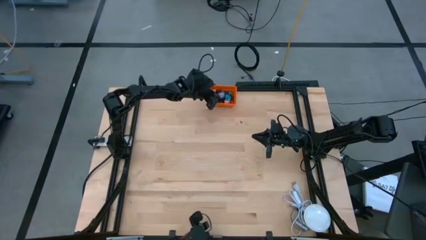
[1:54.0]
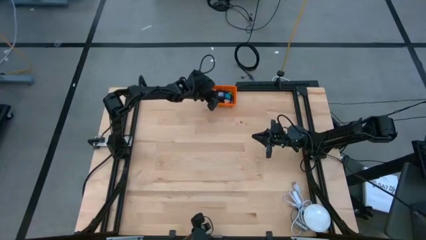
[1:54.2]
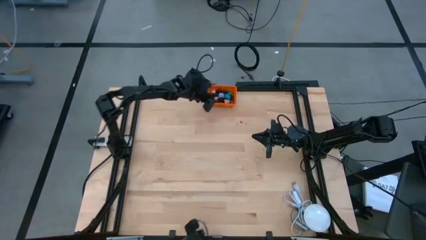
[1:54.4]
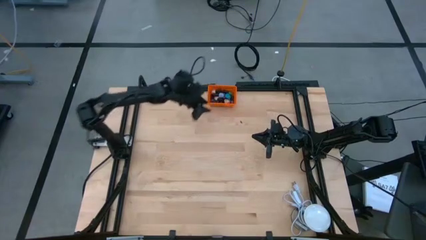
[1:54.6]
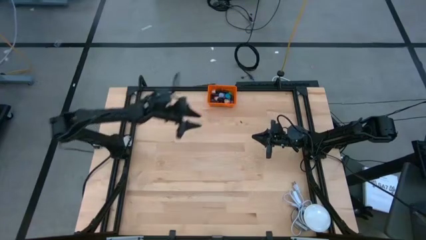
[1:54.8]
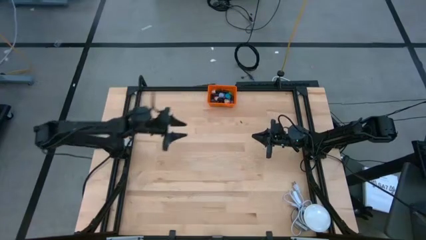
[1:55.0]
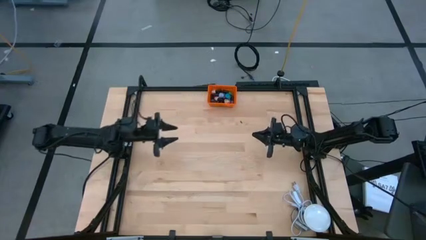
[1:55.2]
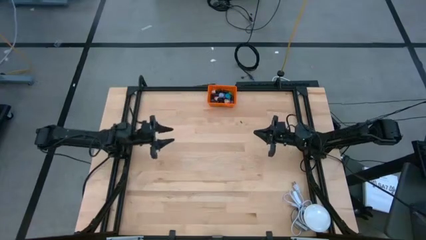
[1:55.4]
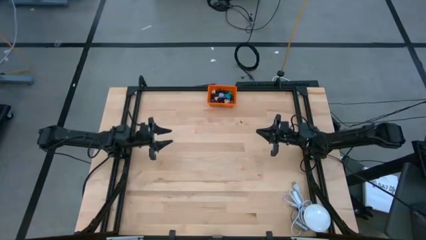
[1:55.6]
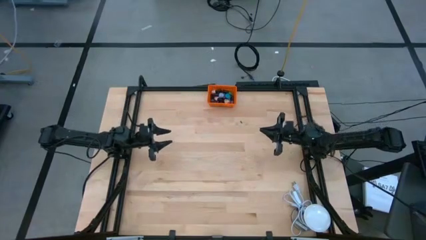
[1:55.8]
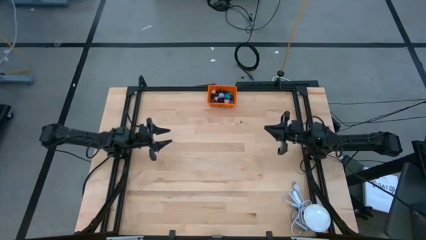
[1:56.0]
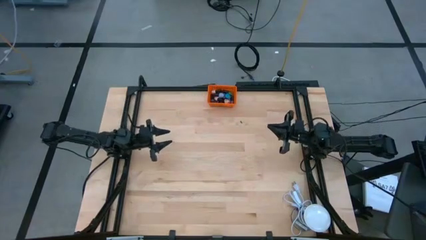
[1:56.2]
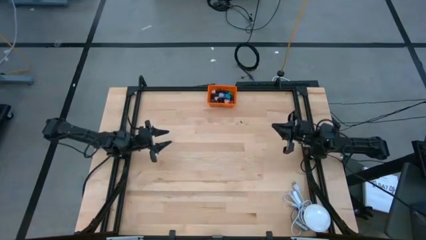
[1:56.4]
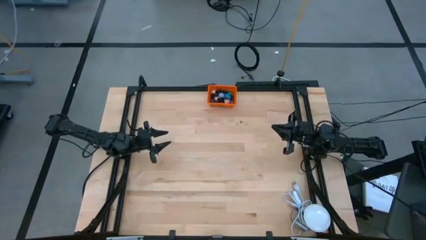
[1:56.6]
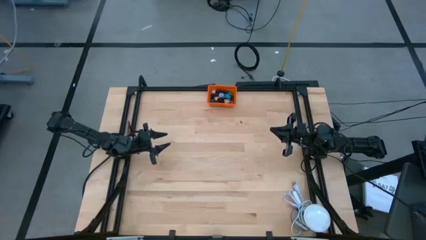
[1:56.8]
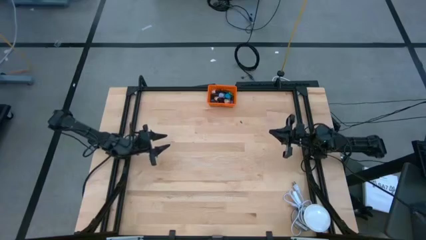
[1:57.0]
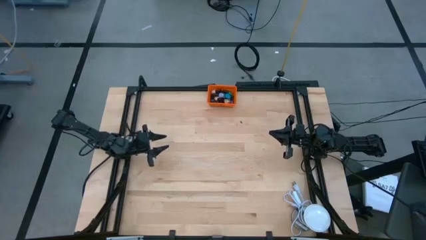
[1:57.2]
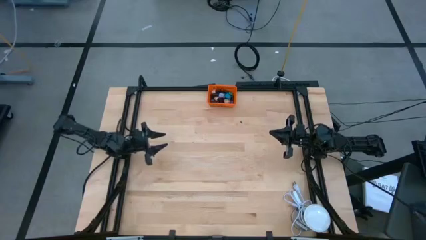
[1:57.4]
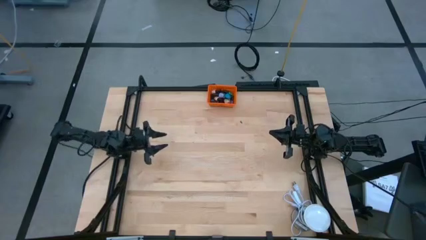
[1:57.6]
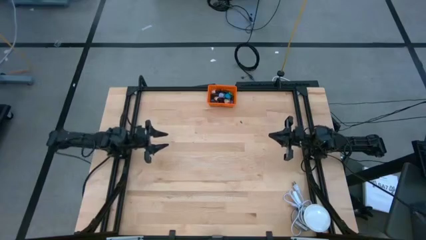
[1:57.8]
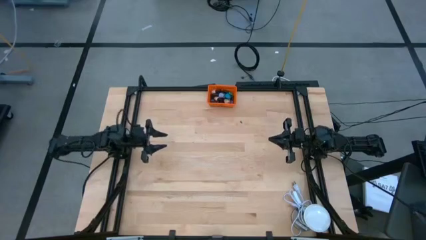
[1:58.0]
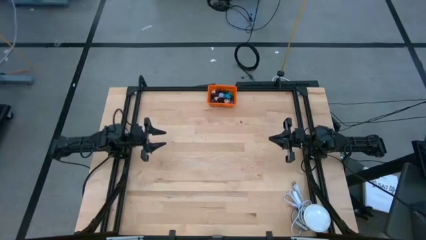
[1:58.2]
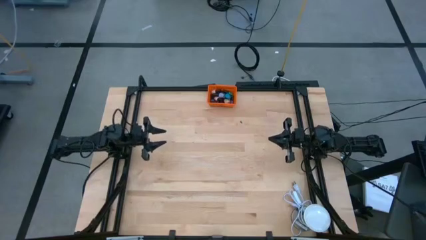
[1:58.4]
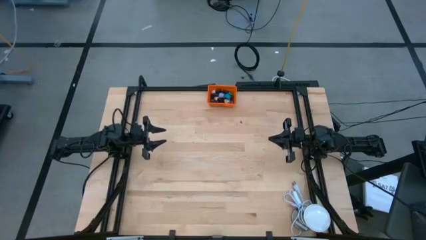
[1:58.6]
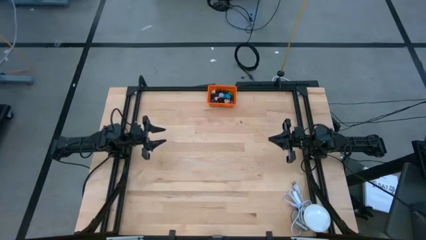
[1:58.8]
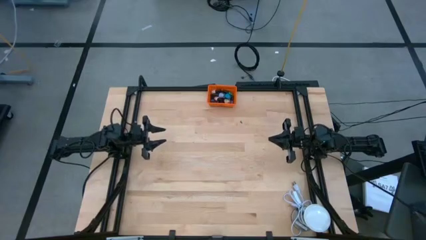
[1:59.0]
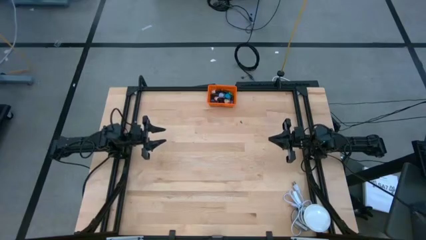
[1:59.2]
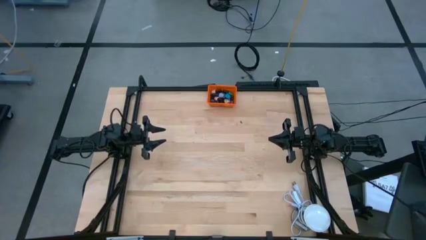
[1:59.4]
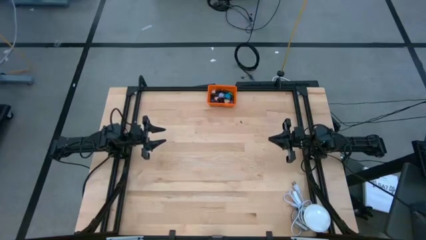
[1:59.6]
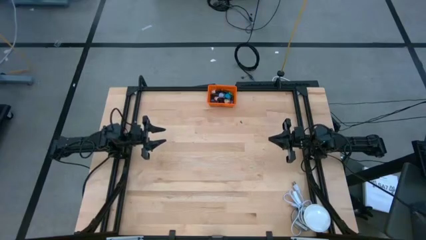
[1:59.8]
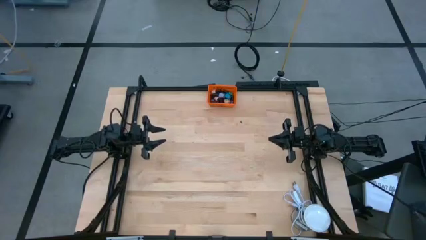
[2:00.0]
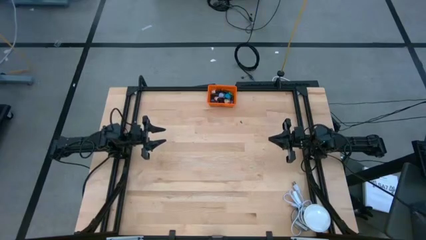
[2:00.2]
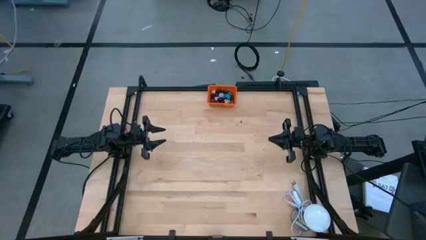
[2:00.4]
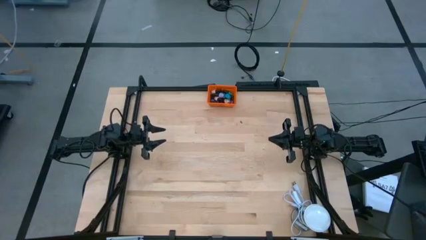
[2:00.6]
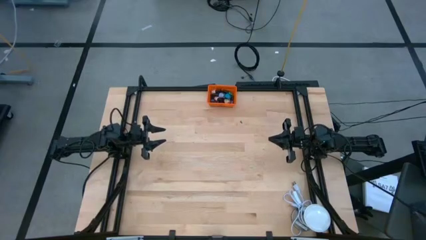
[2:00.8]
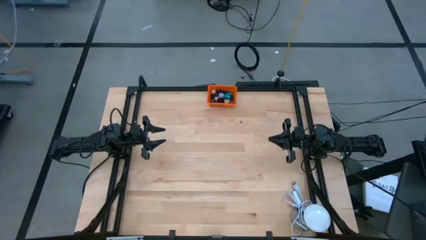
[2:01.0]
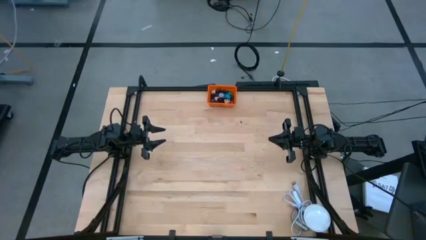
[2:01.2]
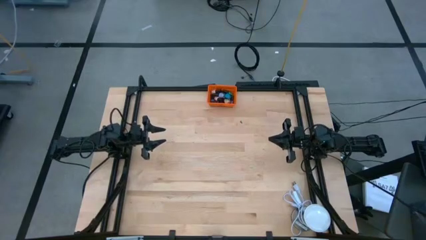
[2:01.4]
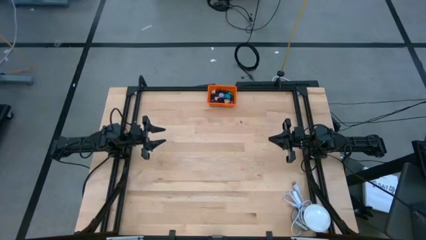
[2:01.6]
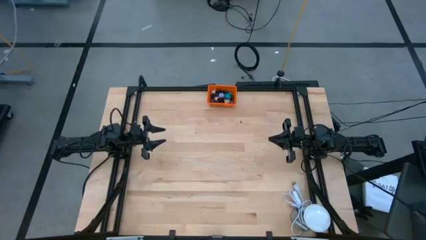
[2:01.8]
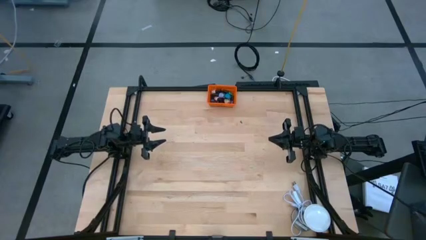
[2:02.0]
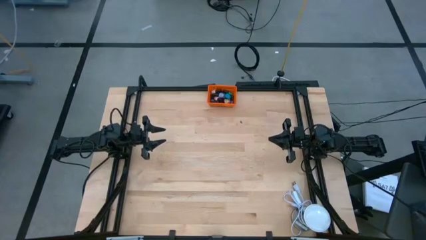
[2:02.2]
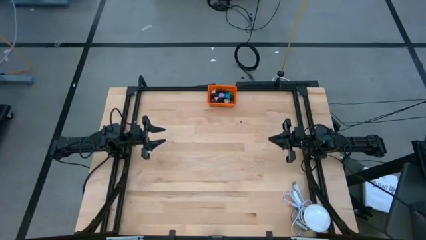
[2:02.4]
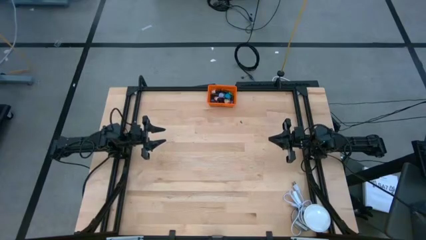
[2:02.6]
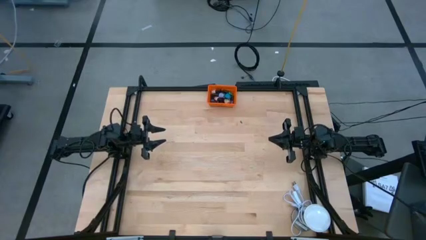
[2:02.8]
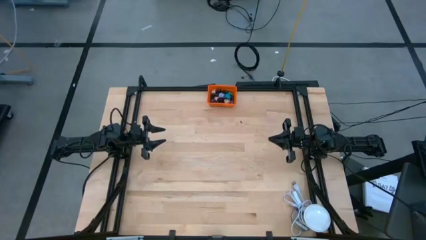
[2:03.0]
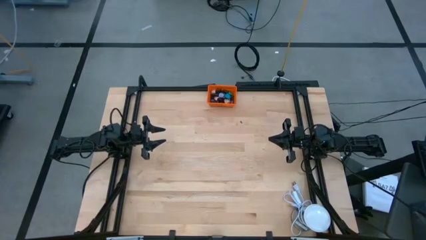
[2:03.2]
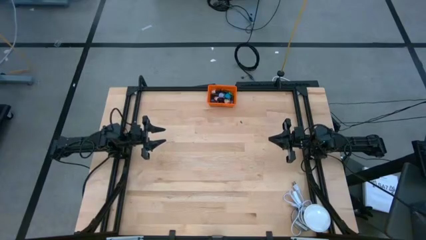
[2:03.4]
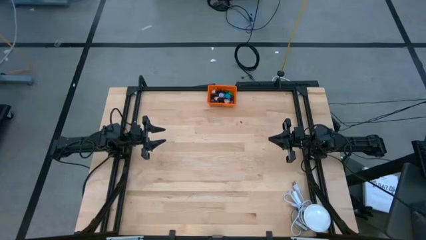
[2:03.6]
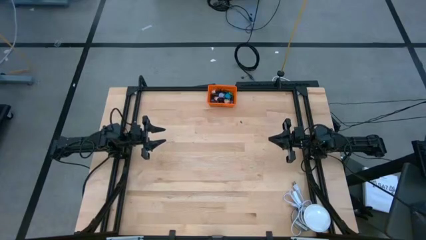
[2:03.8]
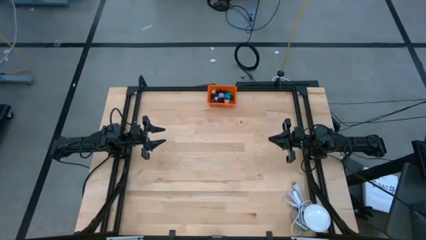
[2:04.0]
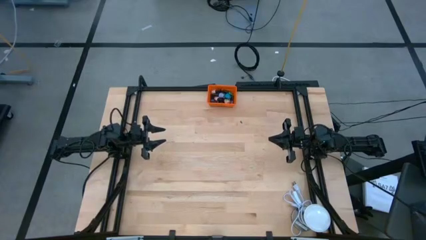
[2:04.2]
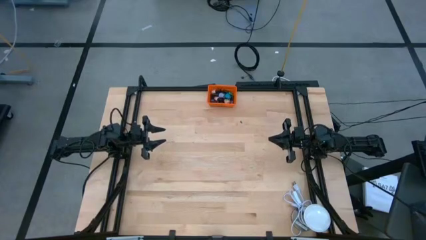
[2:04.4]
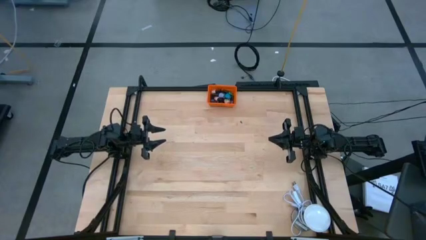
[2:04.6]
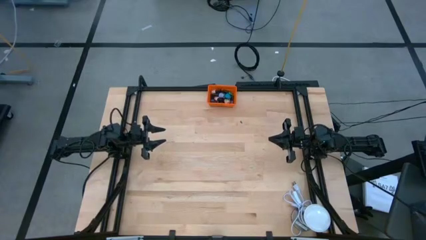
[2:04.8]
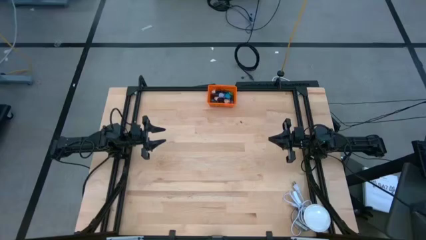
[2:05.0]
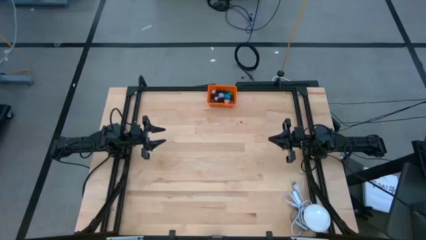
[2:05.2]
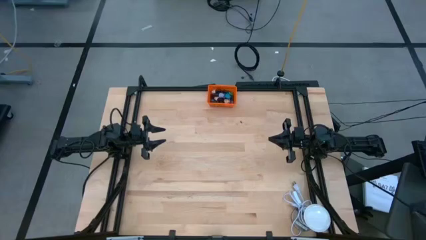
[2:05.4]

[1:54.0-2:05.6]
Task: Pick & Place Nail Polish
Return to Home Position

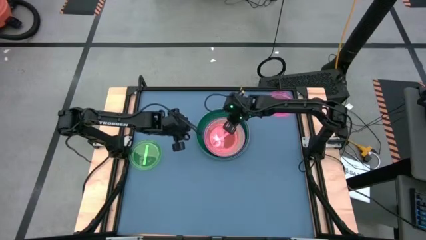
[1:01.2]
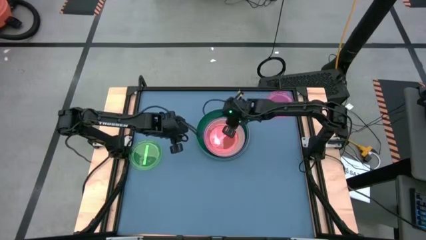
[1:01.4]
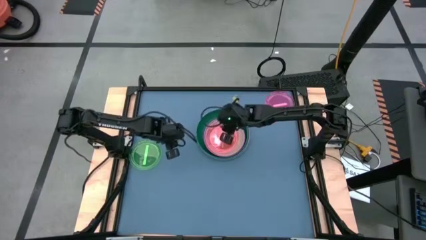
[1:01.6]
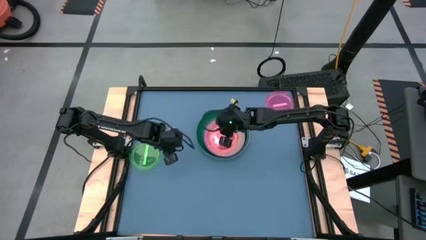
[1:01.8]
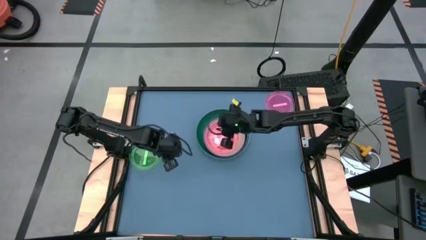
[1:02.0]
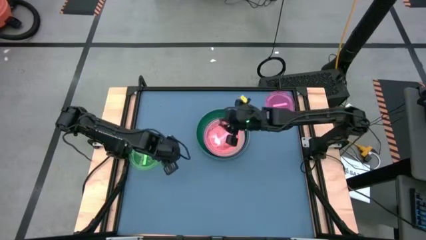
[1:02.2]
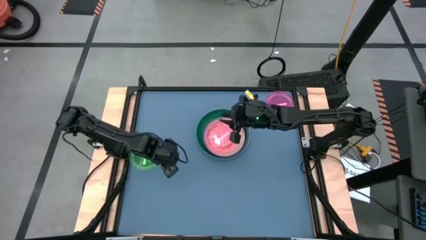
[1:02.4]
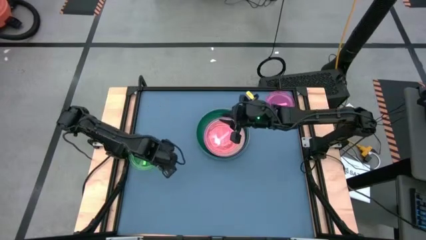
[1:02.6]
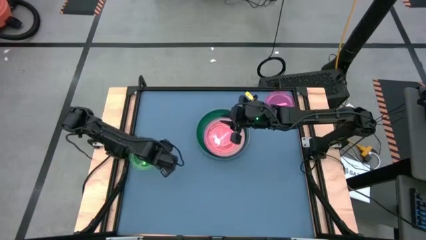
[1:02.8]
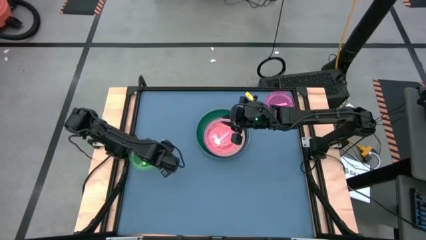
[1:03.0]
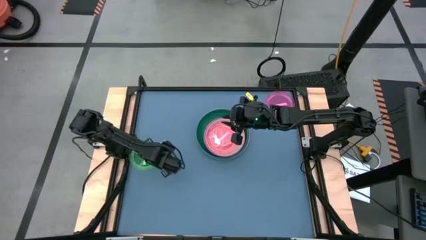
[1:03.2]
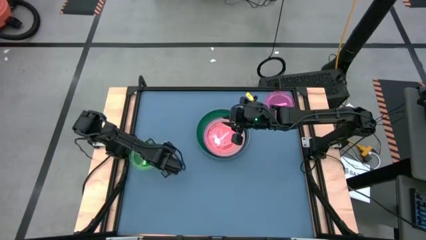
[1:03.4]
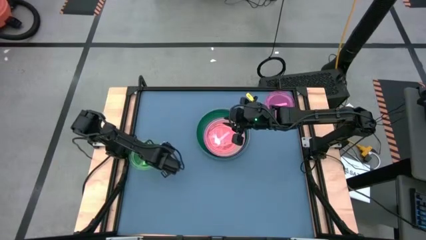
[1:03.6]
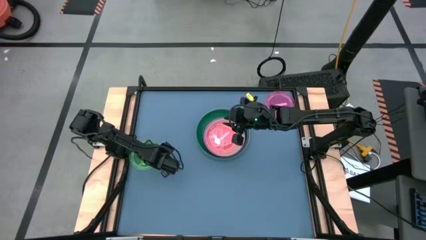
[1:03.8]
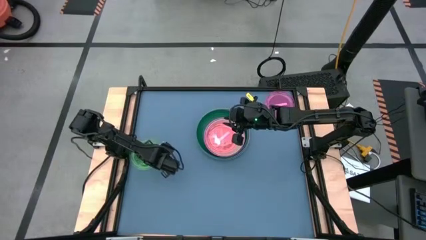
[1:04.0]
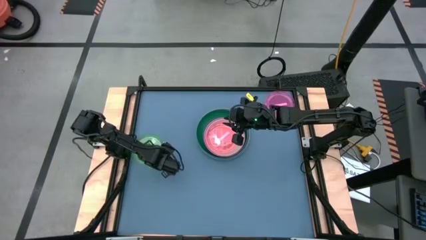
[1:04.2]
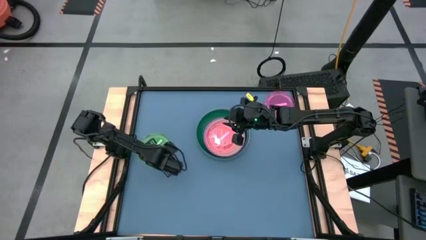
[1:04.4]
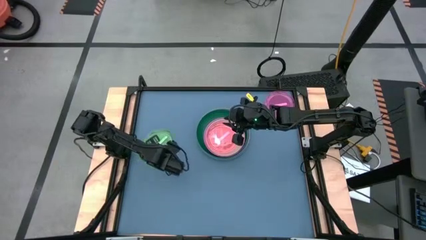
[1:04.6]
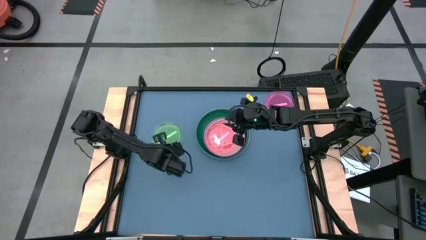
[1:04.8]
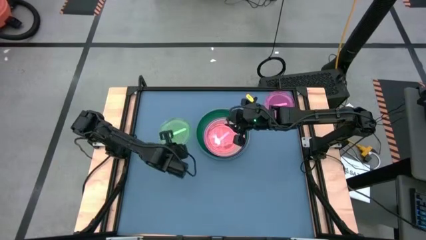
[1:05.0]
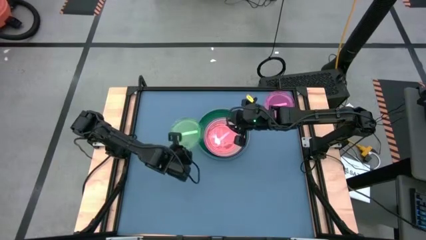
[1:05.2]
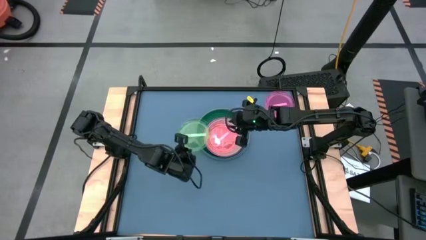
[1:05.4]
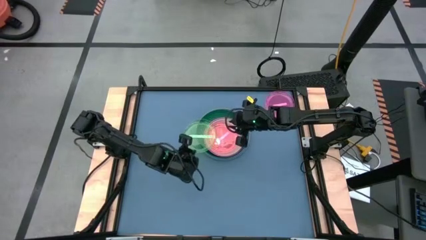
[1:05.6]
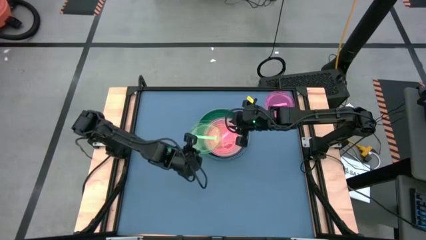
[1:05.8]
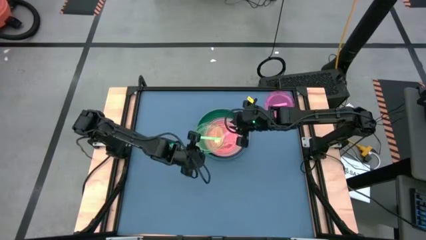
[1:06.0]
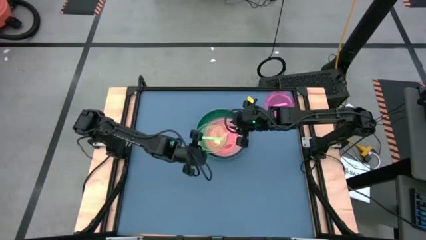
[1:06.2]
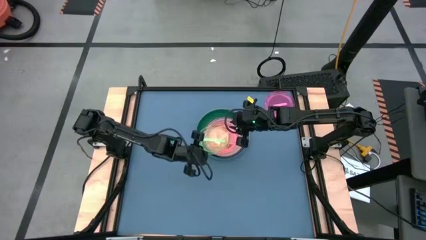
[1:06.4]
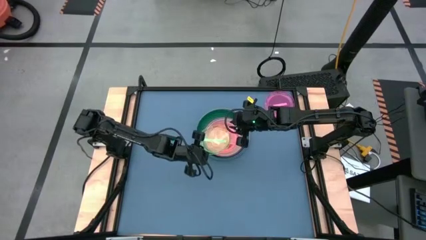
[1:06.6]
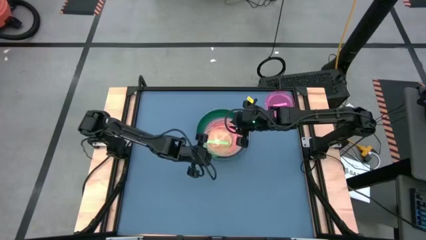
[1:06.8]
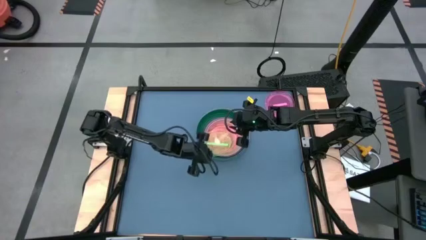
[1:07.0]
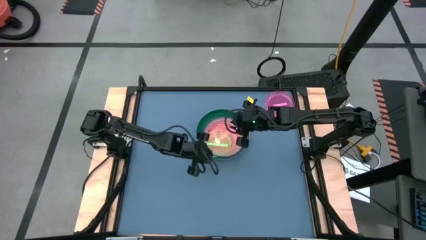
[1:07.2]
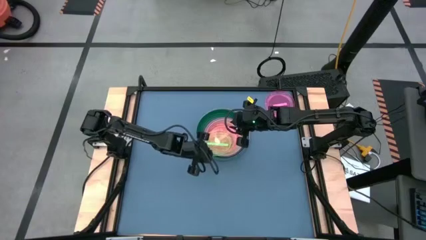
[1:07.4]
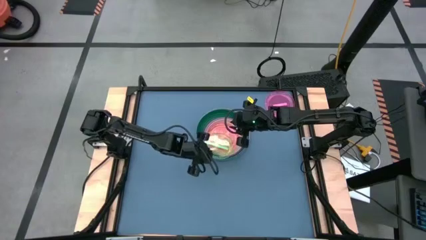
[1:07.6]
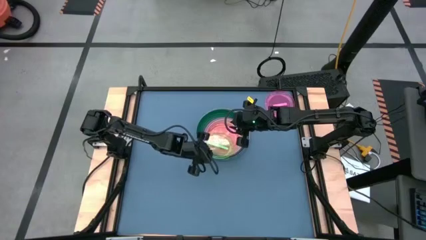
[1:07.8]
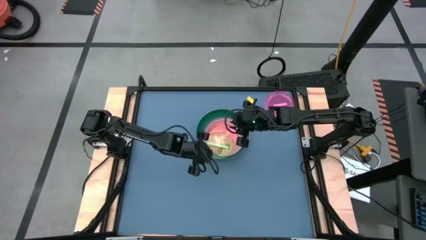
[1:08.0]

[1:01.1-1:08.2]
Task: Stack plastic plates
Stack the light green plate on top of the light pink plate
